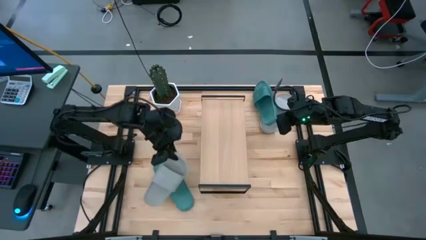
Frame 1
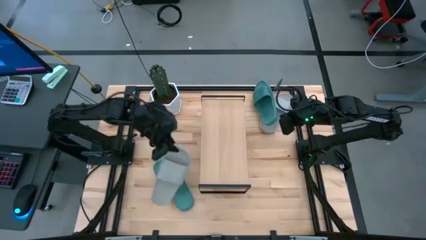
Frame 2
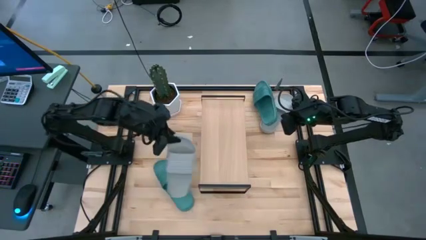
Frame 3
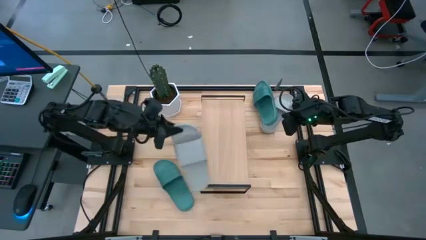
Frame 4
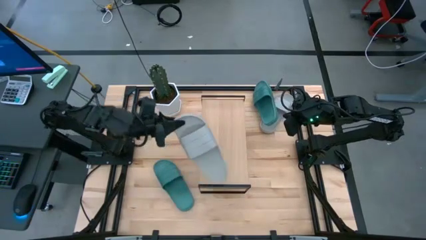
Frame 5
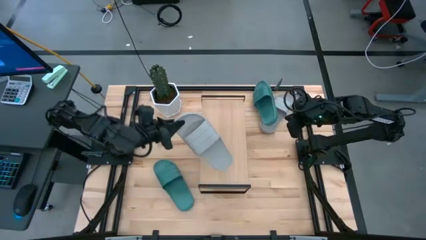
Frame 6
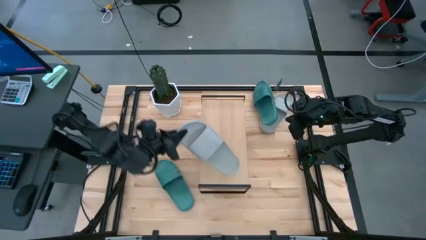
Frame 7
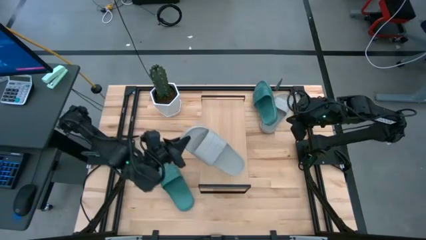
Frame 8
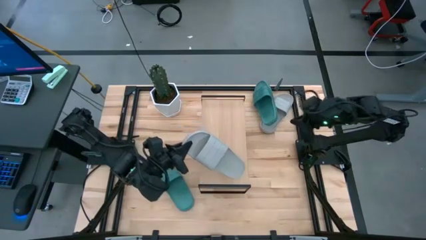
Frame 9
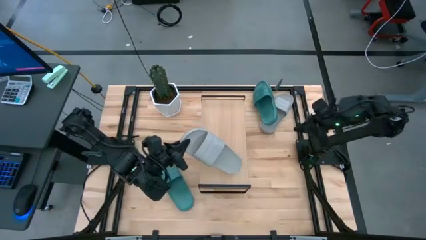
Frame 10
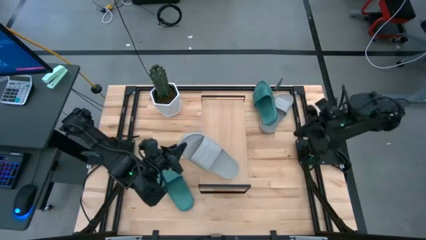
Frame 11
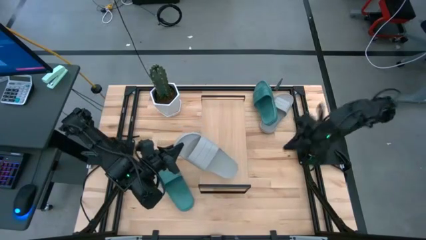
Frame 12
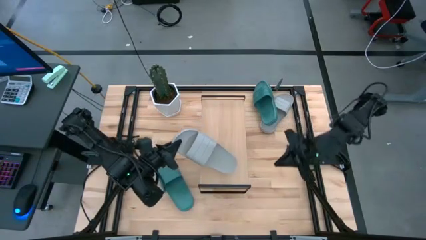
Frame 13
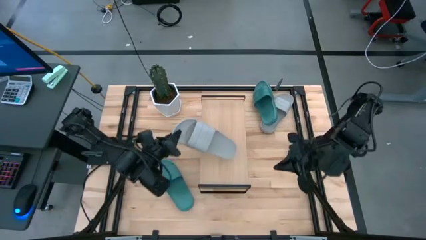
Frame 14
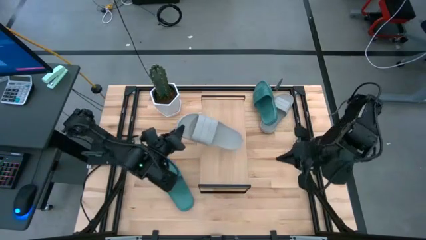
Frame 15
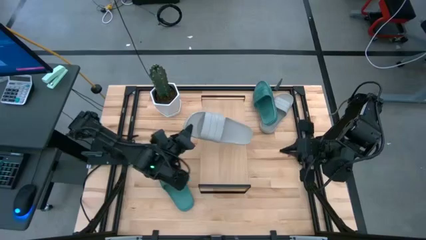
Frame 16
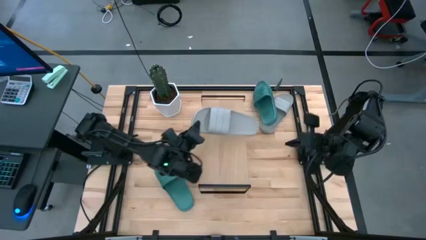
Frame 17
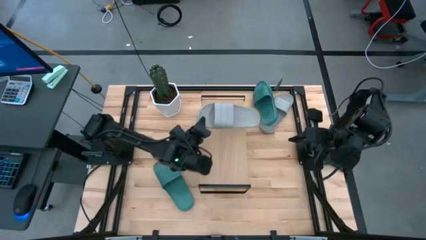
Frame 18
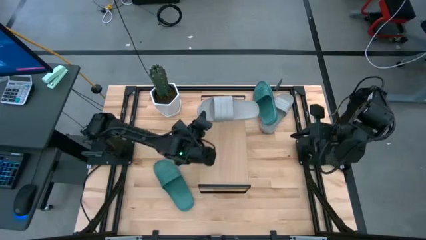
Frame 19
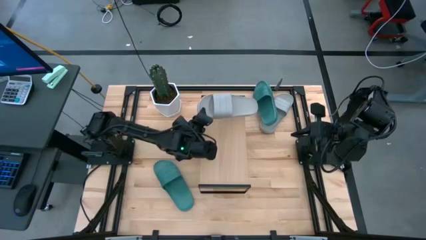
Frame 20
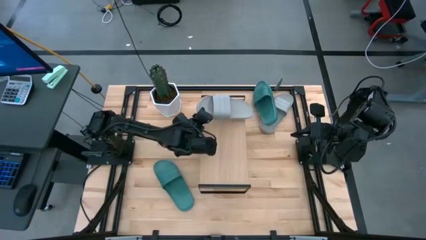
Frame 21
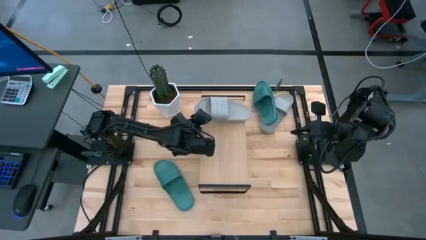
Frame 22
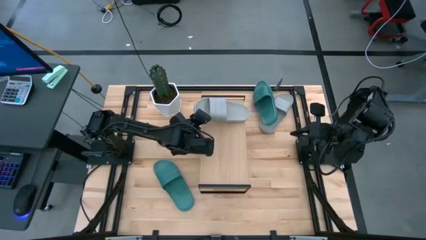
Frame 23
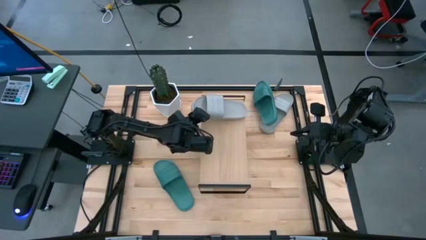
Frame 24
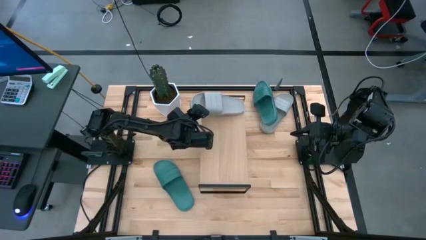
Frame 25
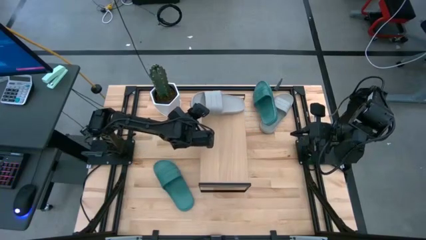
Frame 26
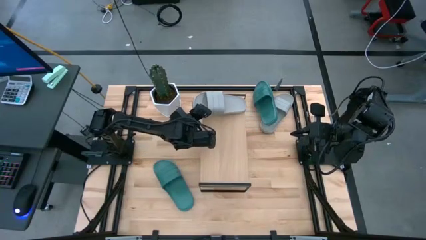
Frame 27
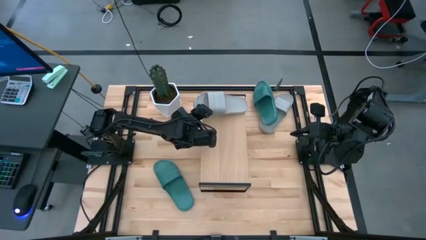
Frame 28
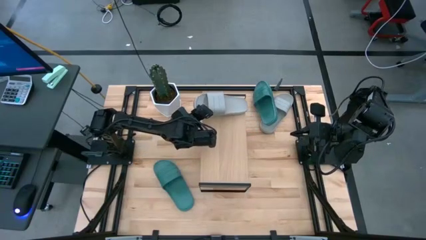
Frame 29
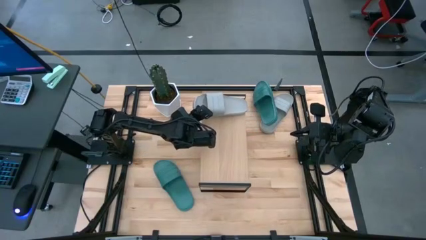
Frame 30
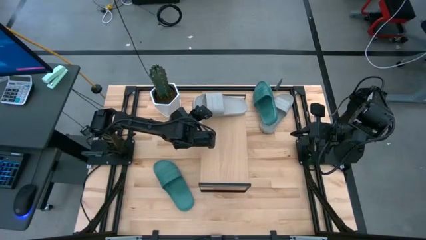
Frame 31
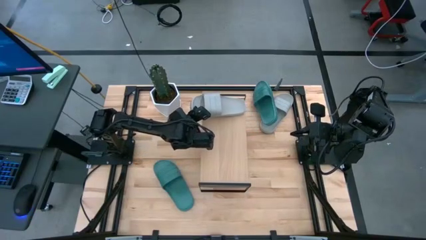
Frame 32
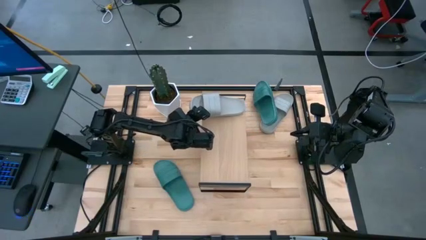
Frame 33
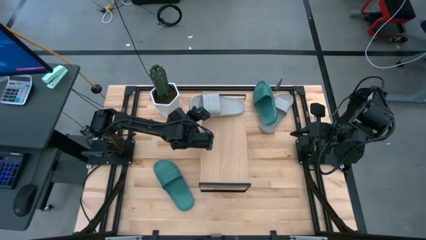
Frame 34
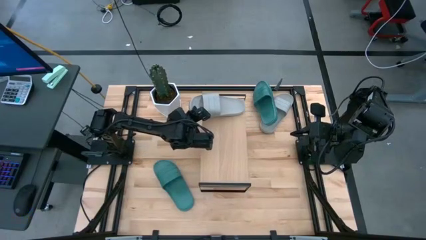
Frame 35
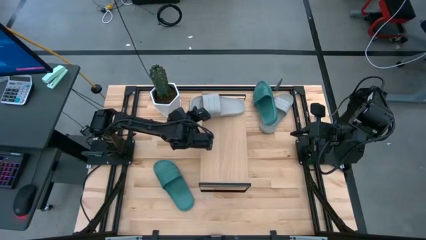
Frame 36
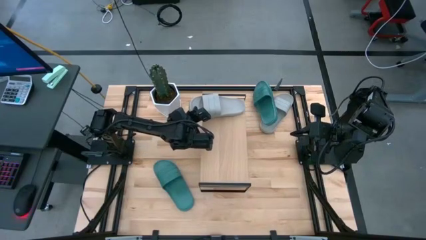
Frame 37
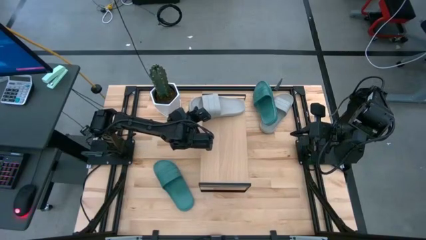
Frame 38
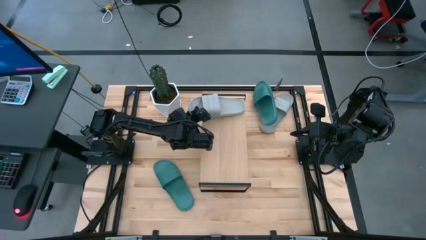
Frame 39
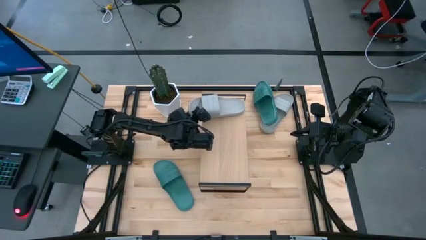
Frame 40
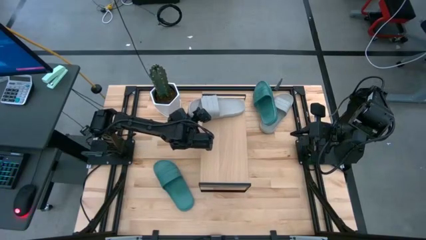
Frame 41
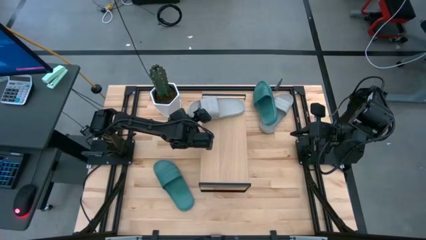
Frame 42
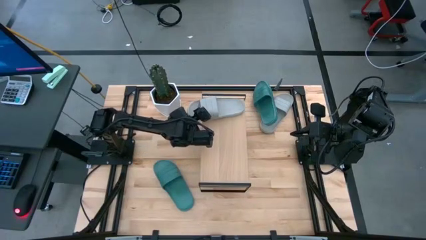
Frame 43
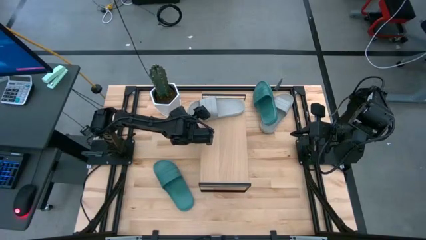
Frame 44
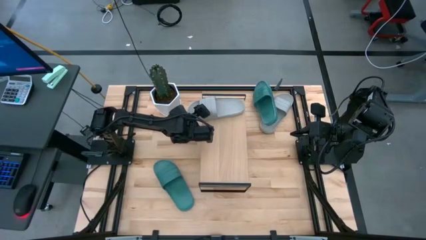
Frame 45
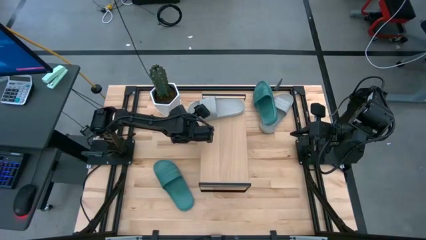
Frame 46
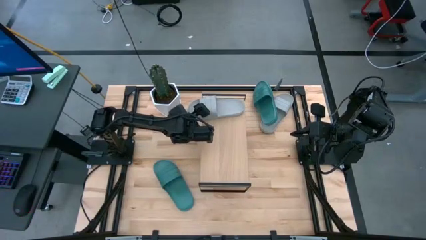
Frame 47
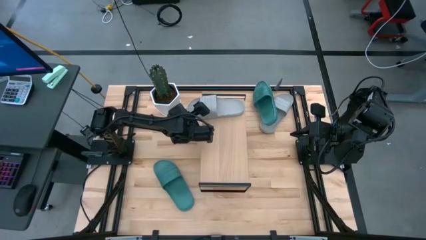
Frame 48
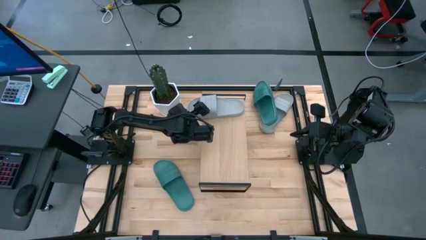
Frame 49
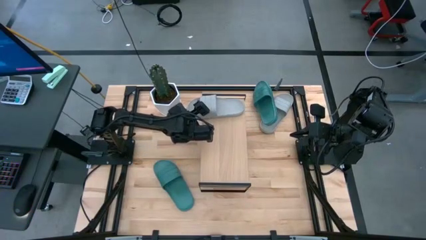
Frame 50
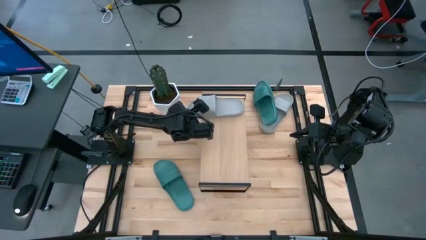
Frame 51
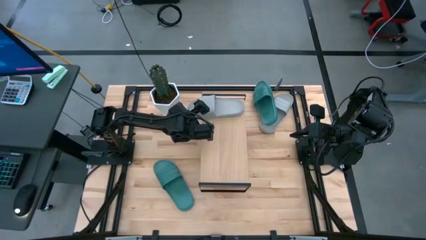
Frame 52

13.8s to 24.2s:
Task: Pick and place slides into the shelf
Put the bottom gray slipper on the shelf

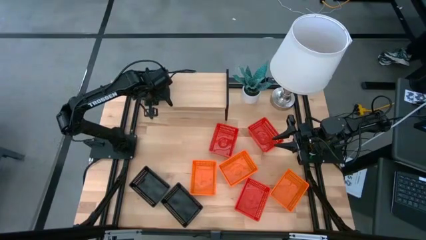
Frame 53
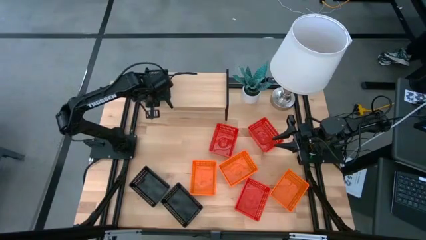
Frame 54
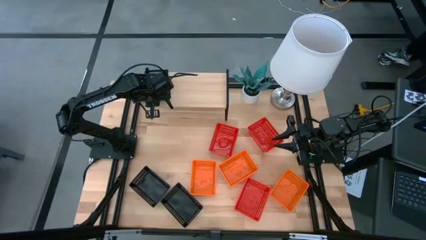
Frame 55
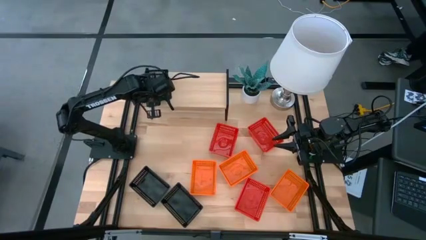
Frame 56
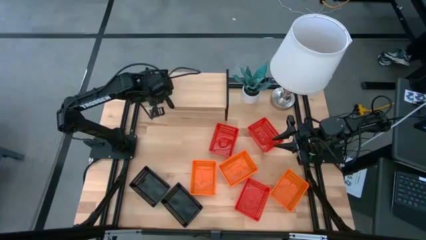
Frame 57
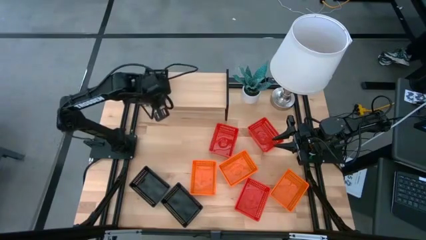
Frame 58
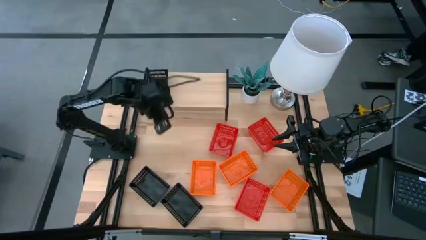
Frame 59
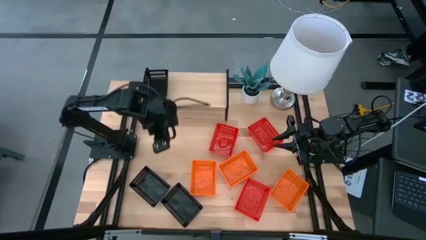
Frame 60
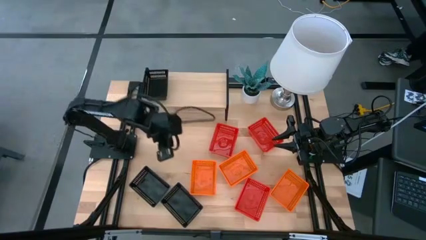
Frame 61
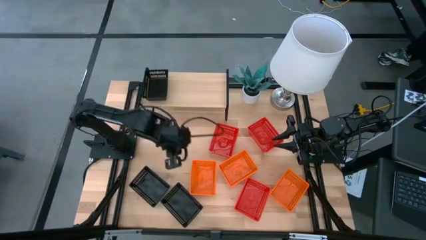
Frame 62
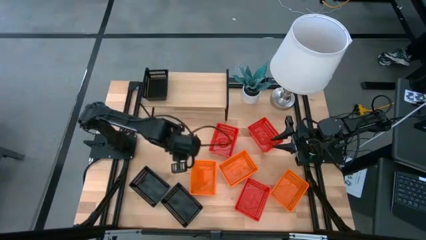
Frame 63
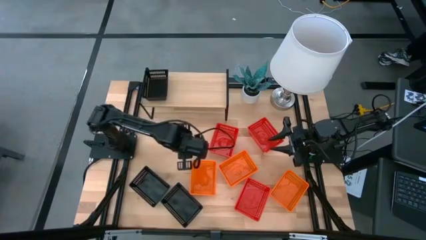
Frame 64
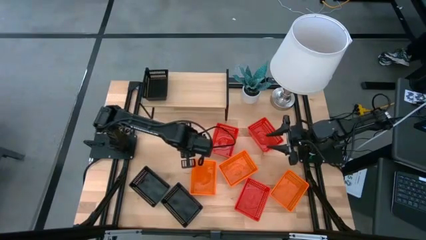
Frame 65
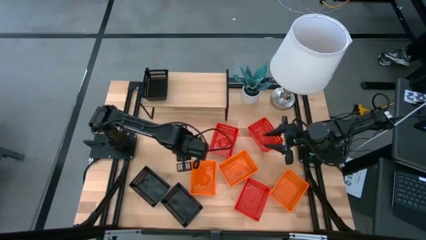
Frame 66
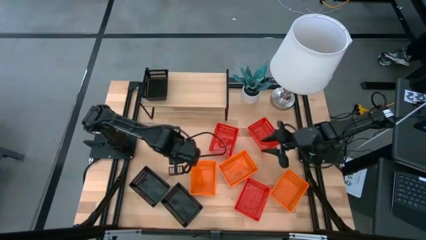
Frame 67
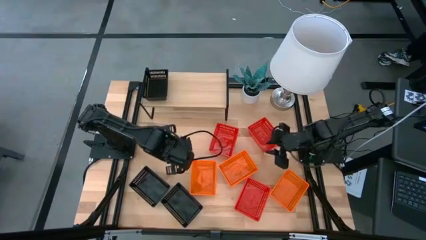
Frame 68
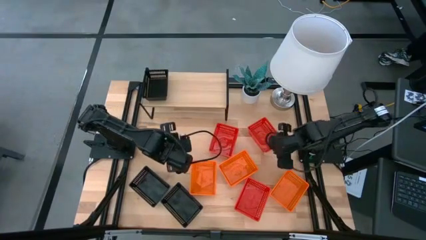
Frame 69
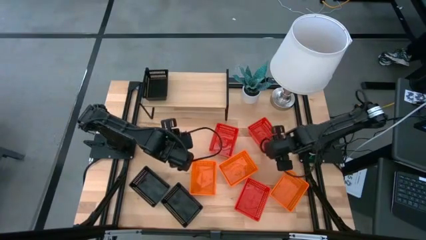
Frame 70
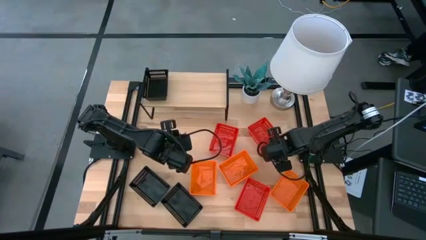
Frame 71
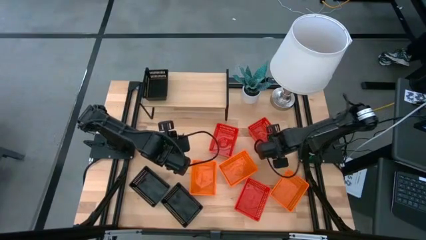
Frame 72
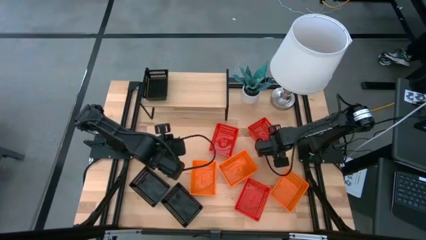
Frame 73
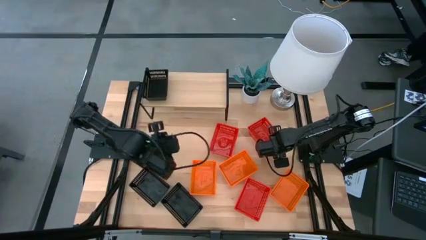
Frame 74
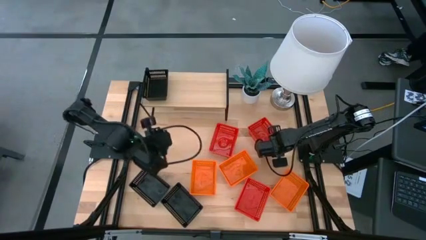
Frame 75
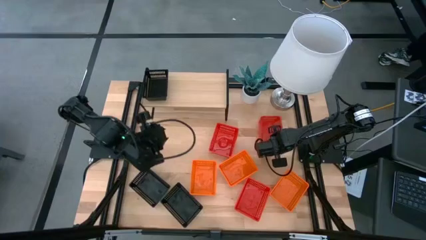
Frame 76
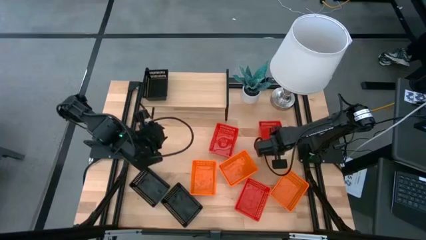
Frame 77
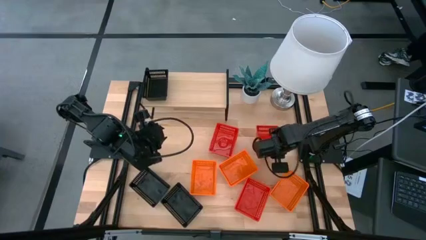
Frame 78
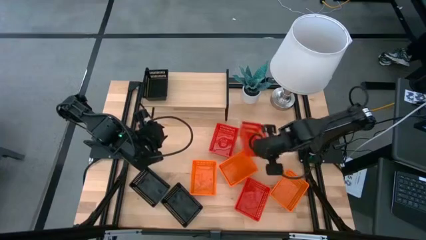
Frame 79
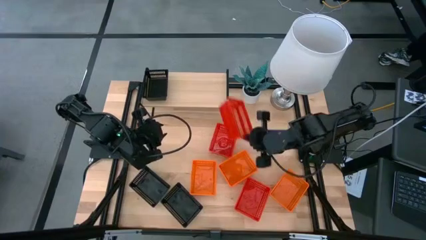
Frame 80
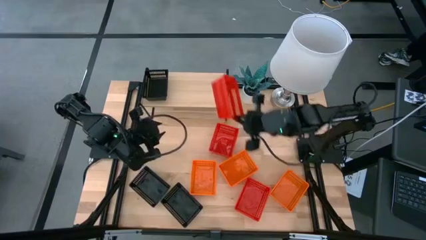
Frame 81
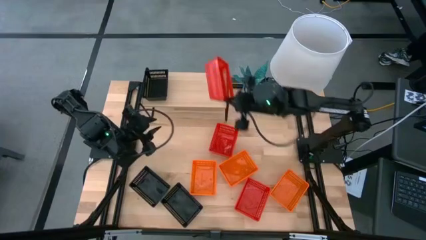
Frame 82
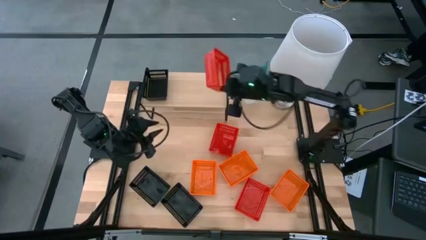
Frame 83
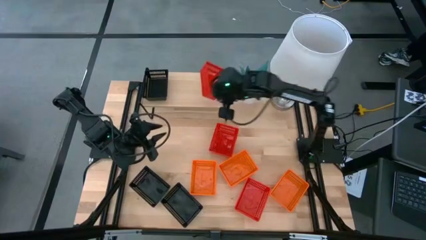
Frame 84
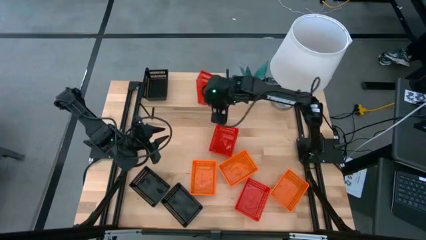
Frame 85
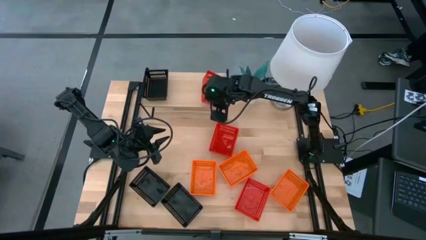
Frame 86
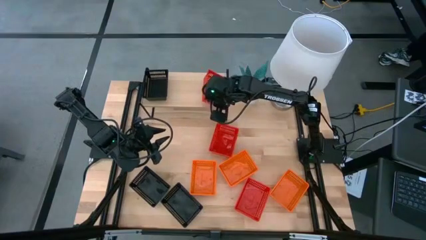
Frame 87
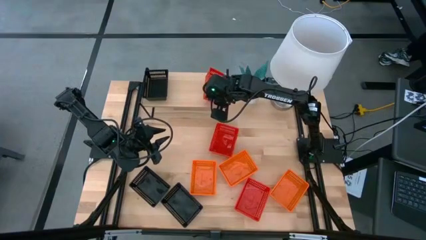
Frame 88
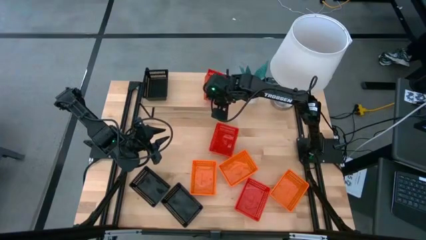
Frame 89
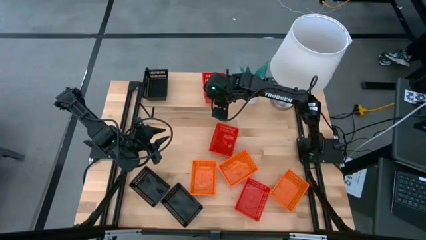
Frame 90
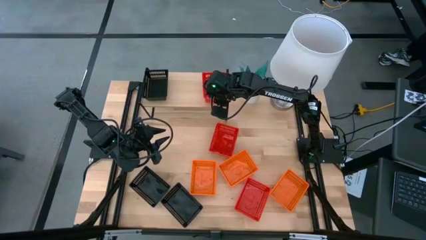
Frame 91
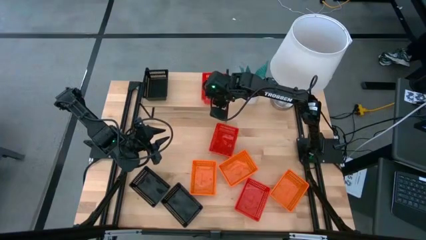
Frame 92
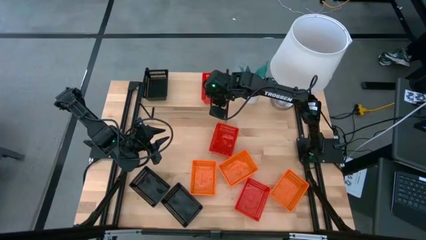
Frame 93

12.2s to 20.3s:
Task: Stack baskets on shelf by color
Put the top right red bin on the shelf
